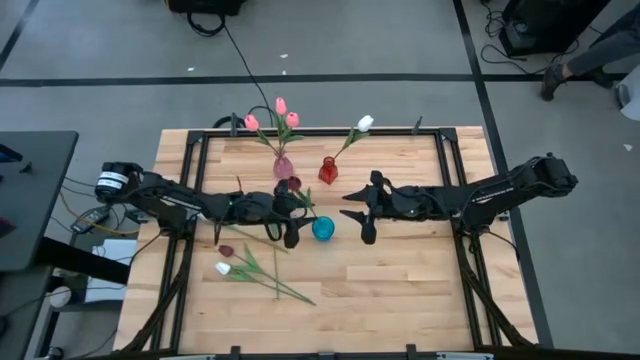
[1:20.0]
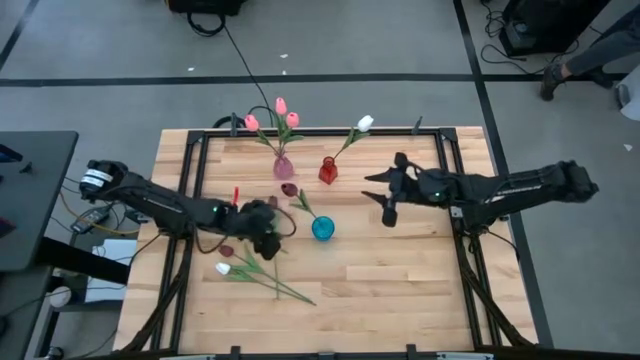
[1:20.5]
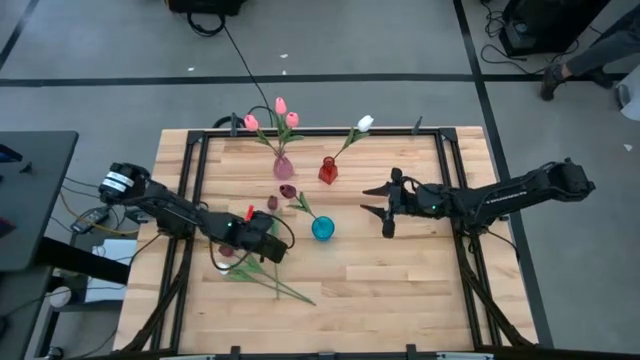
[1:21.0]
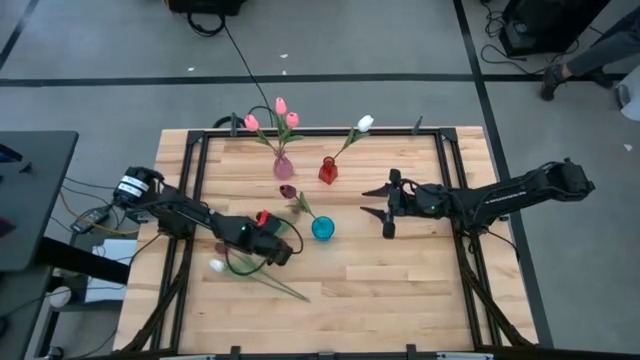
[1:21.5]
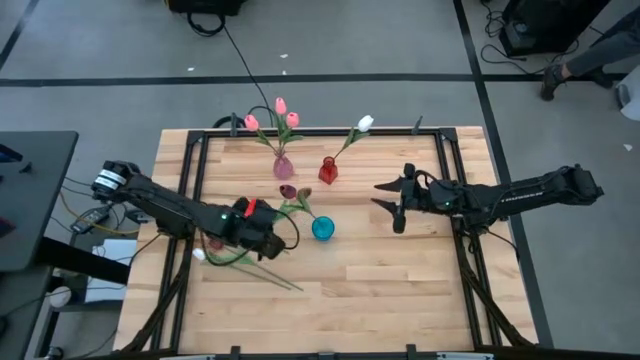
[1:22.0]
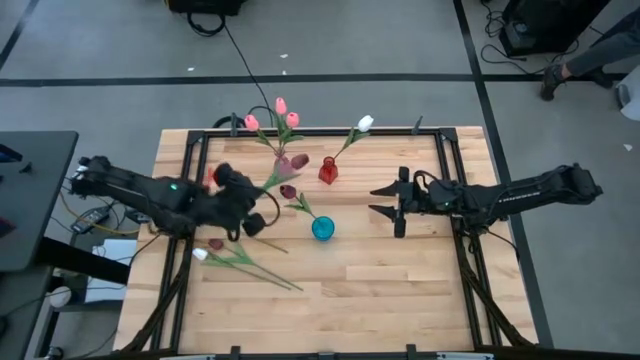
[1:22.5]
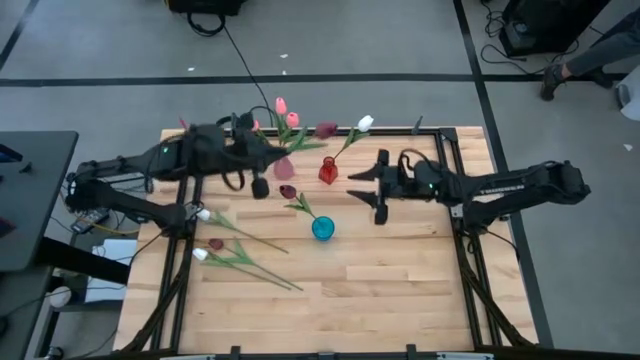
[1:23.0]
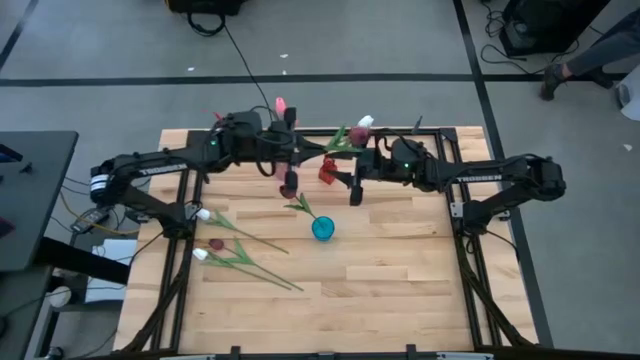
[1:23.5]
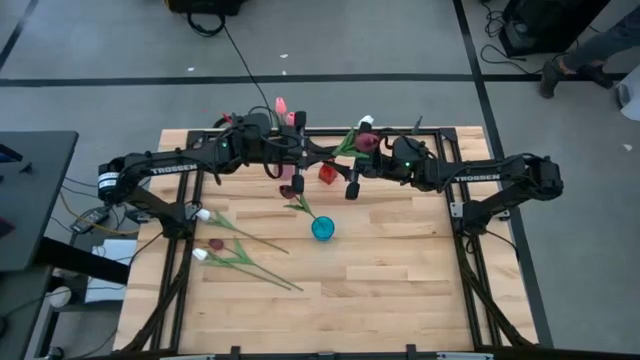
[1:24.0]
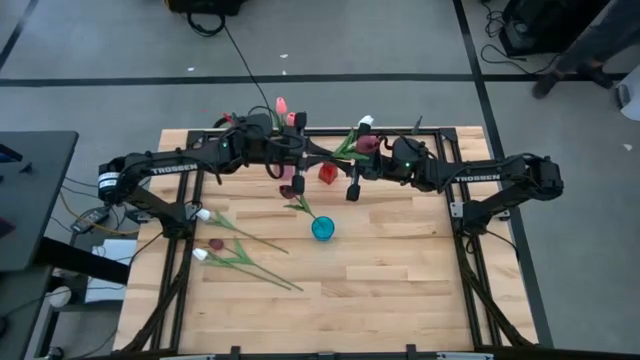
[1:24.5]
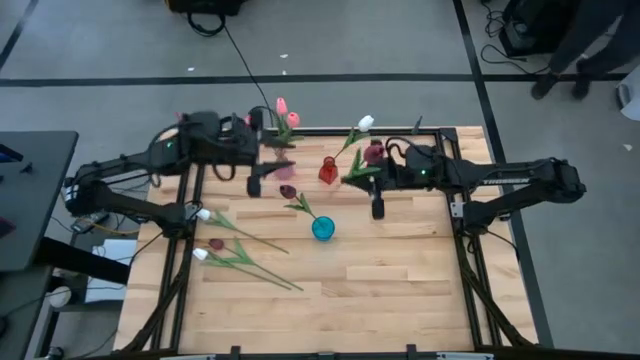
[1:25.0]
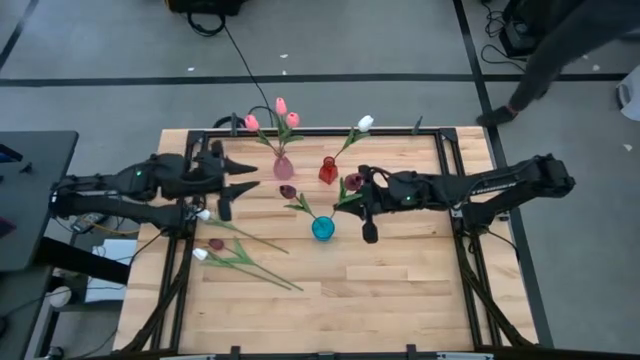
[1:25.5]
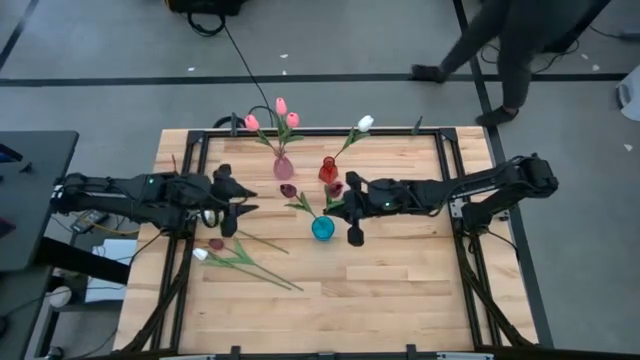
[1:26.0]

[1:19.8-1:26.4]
Task: Sort flowers into vase by color
Put the top red flower into the blue vase

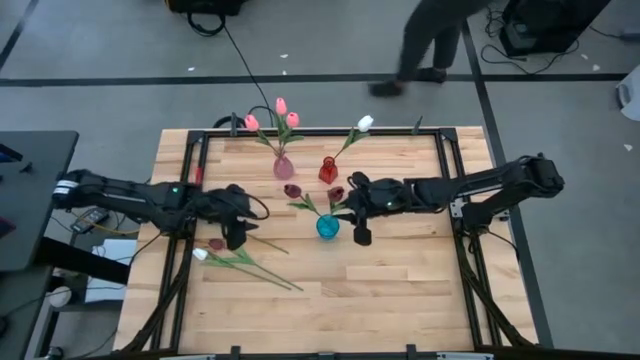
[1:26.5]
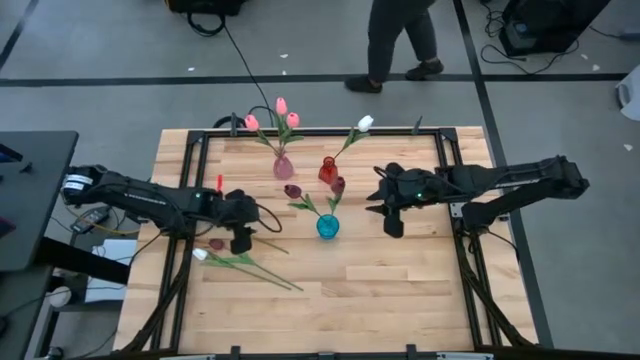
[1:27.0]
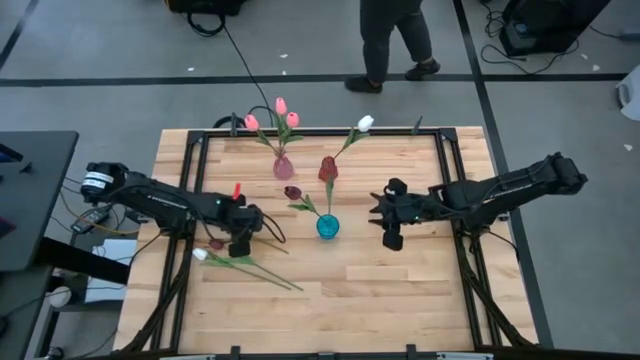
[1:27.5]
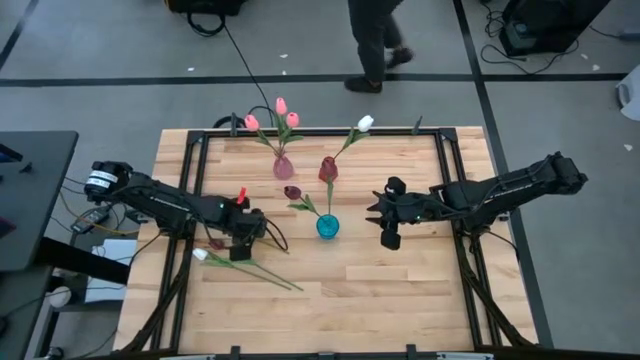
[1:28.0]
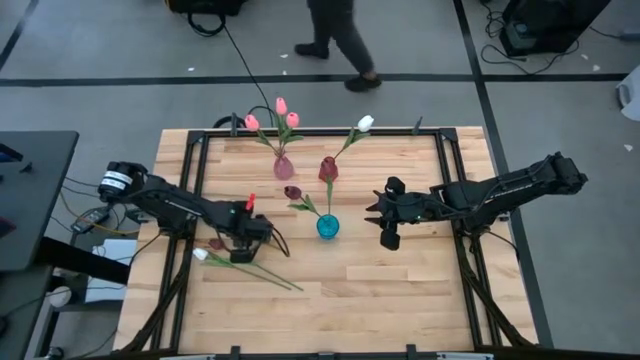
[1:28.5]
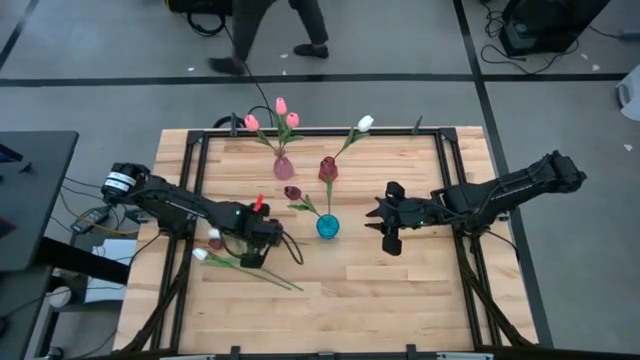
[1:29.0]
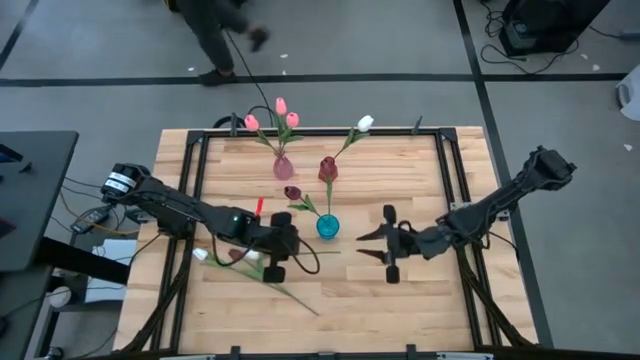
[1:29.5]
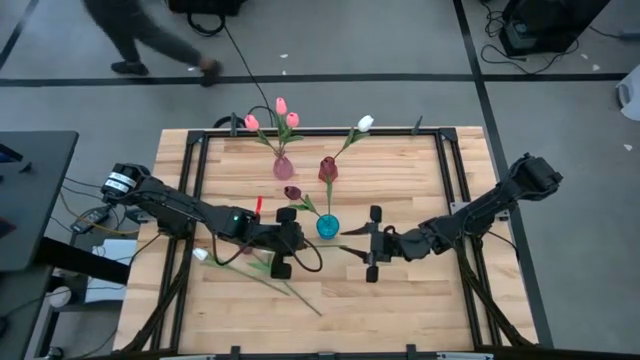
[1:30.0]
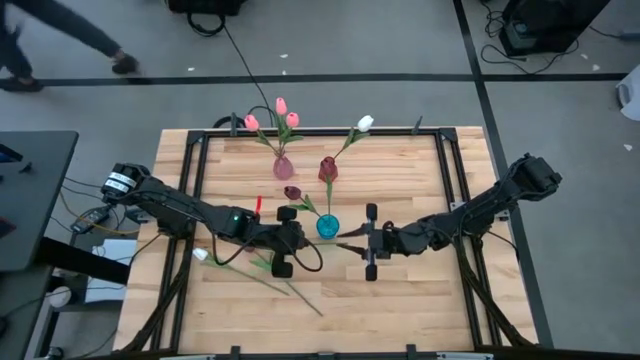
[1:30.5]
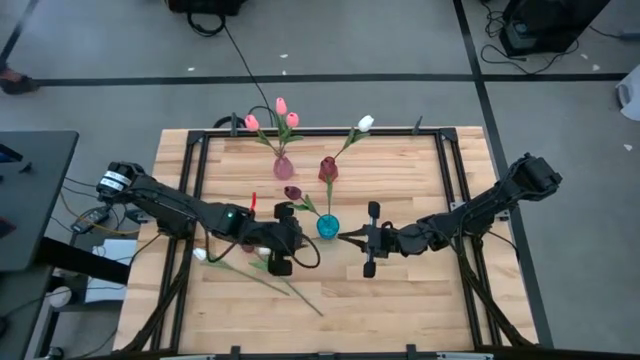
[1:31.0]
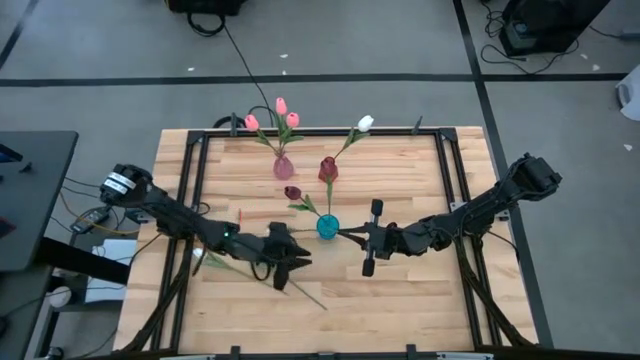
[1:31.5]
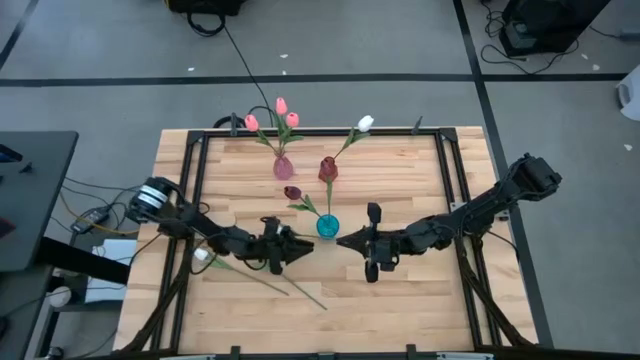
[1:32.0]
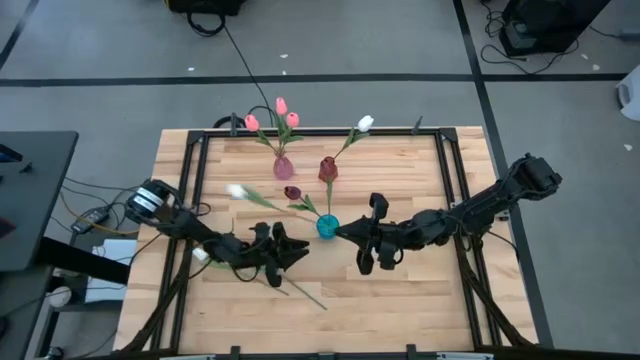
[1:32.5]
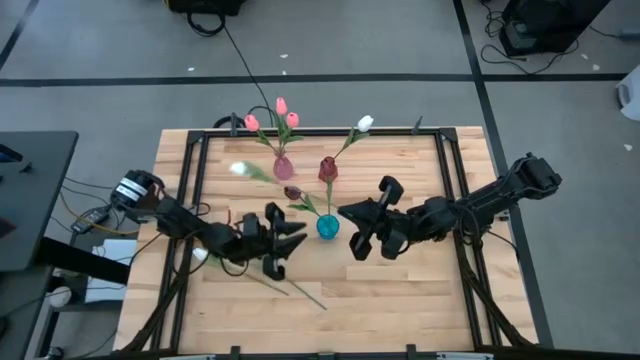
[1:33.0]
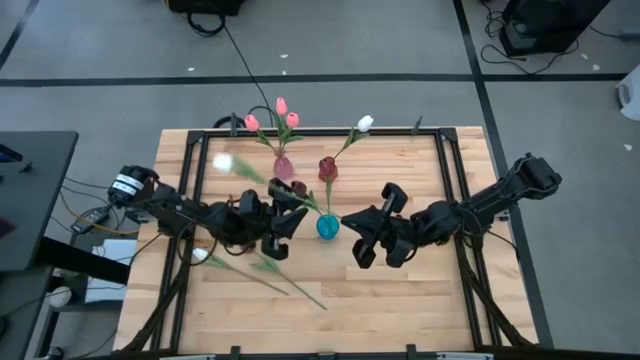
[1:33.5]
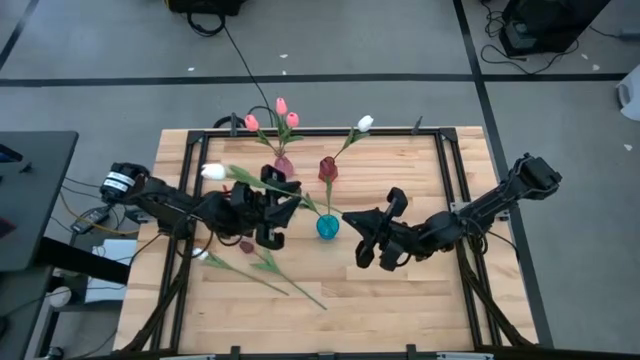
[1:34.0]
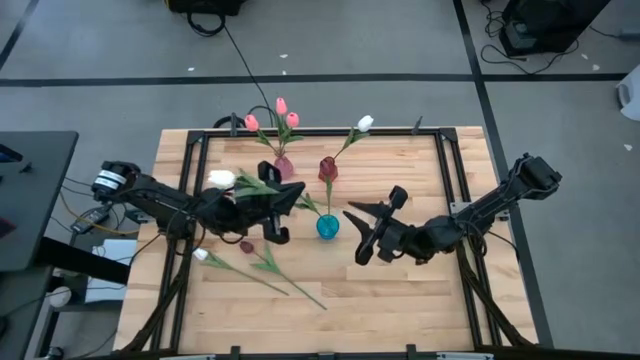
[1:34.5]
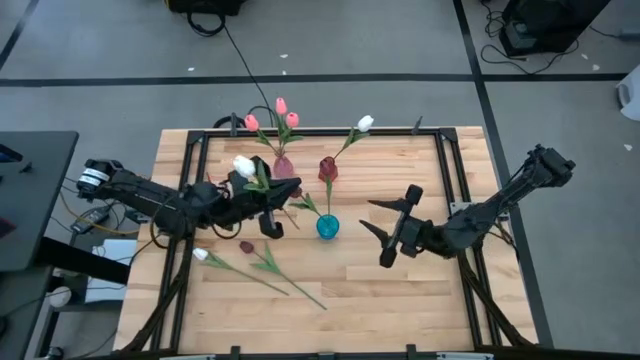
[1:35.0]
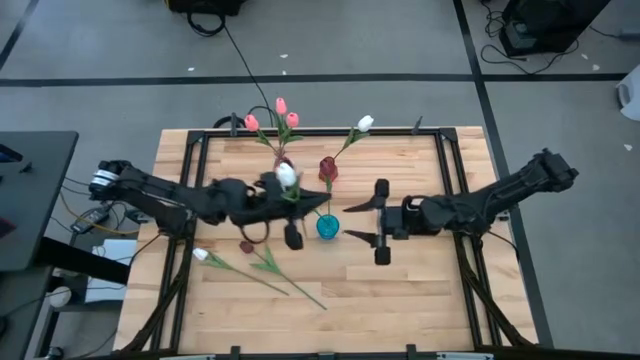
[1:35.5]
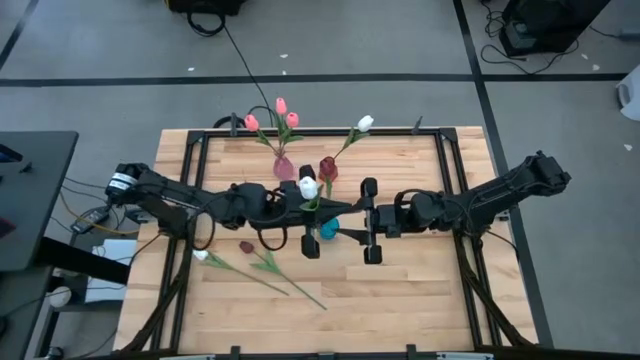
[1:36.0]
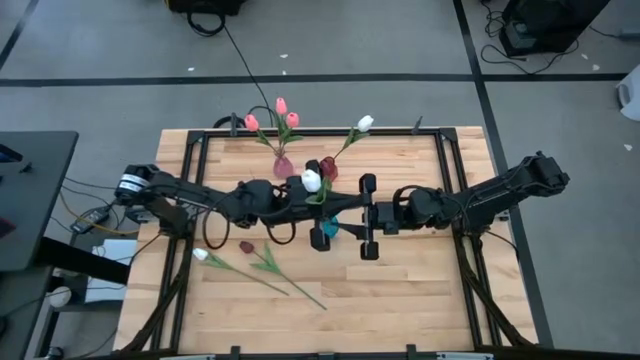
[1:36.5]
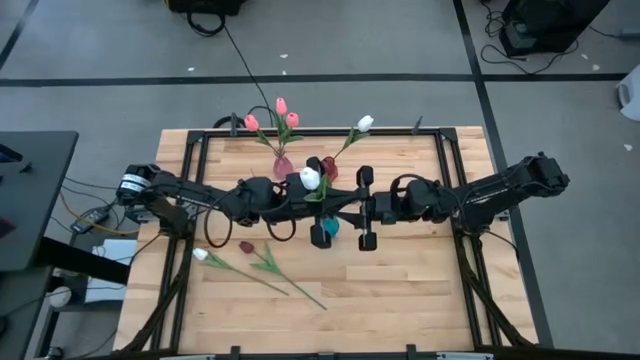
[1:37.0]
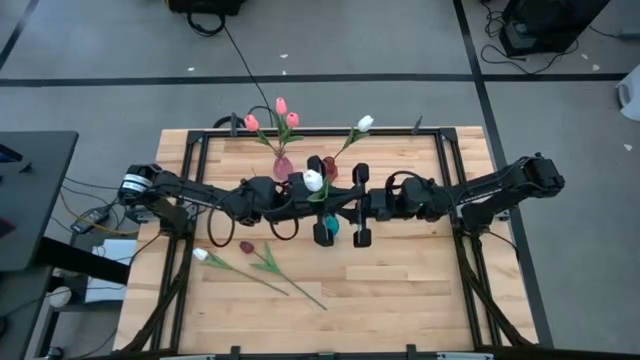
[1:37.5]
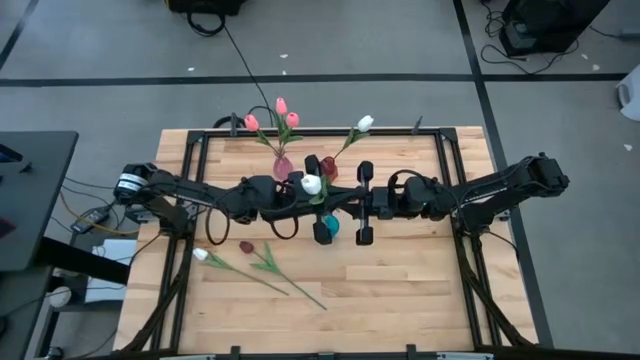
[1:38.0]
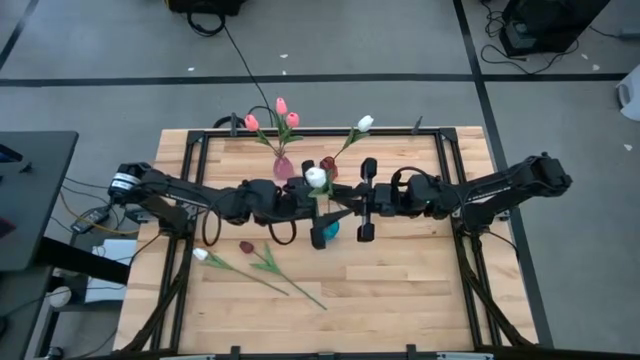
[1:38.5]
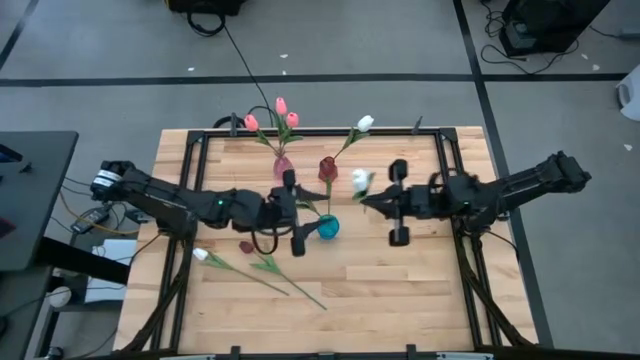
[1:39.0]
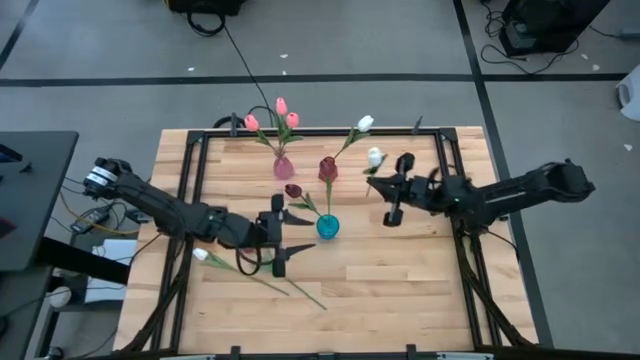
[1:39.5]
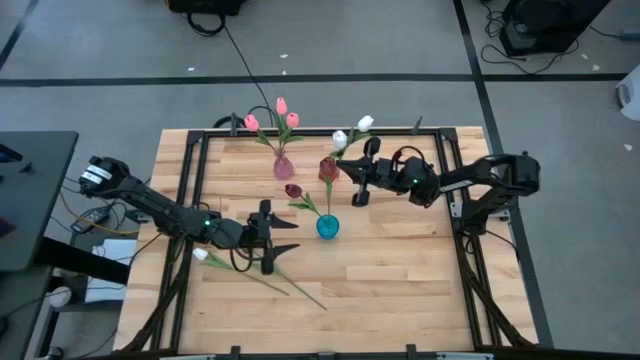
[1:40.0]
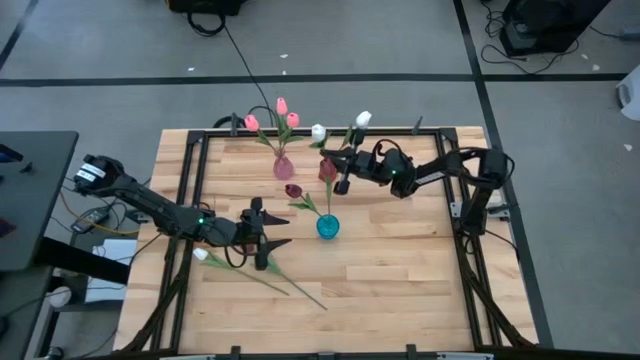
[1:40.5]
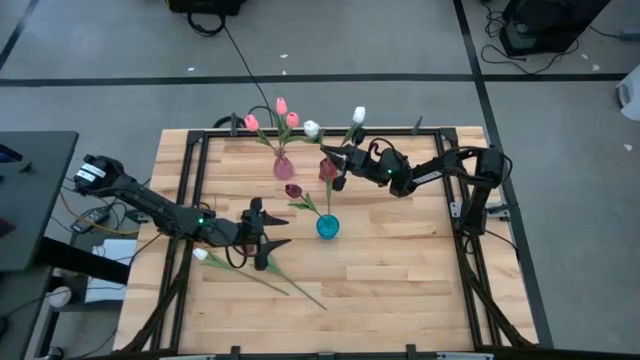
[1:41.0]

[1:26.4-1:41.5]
Put the top white flower into the red vase
